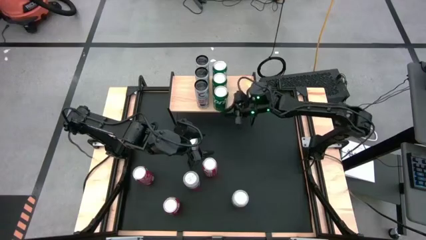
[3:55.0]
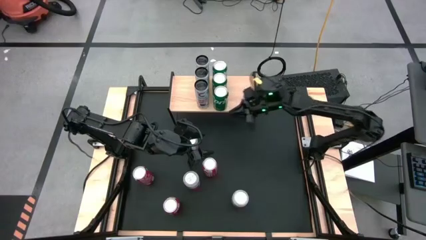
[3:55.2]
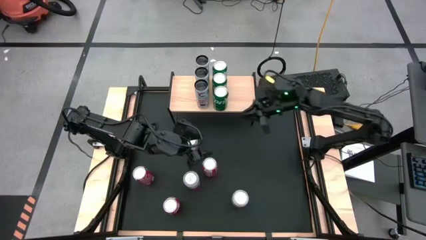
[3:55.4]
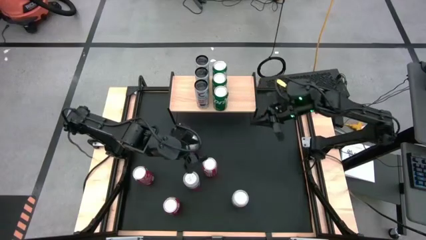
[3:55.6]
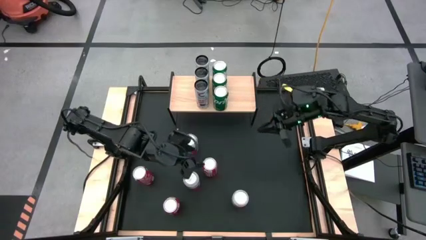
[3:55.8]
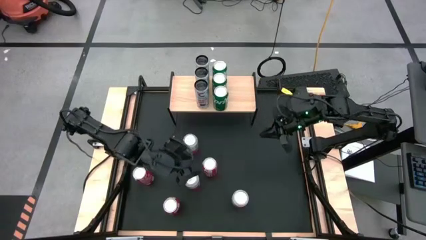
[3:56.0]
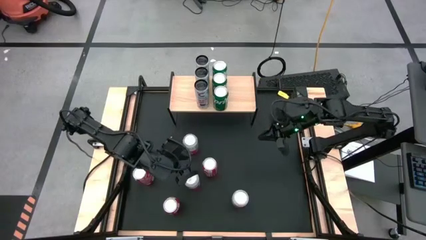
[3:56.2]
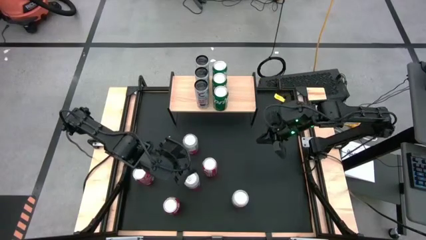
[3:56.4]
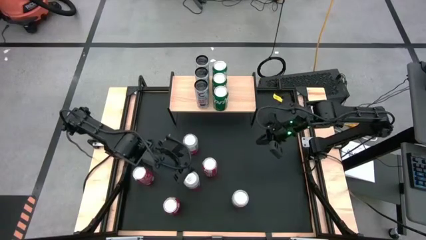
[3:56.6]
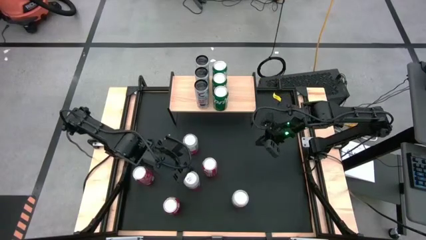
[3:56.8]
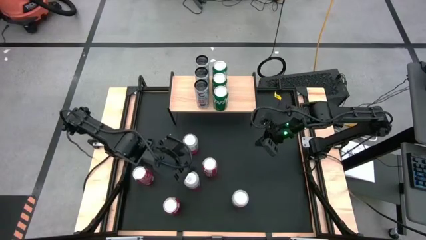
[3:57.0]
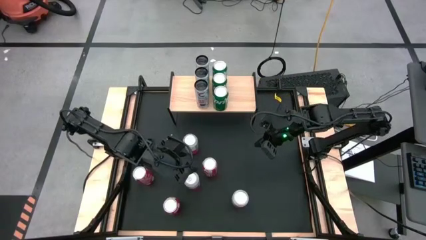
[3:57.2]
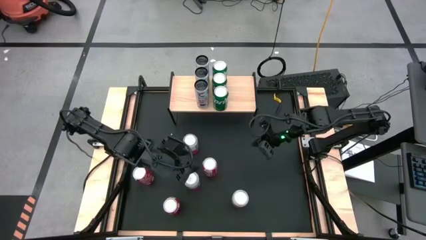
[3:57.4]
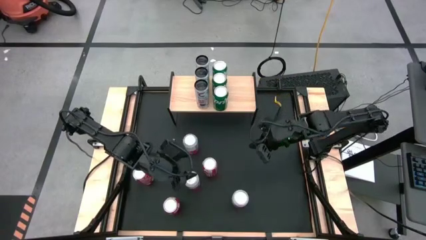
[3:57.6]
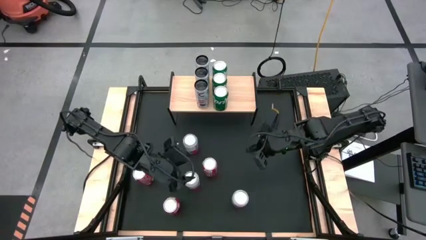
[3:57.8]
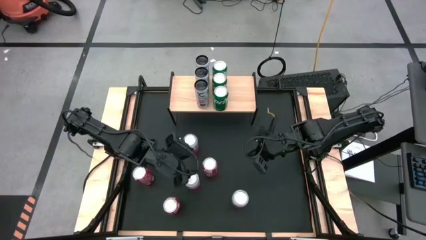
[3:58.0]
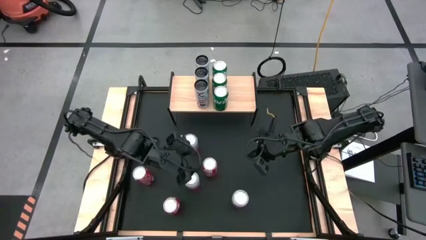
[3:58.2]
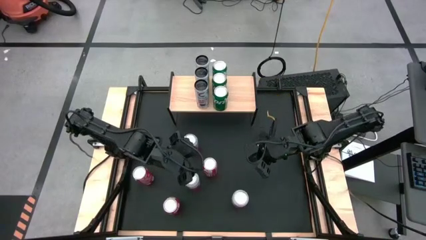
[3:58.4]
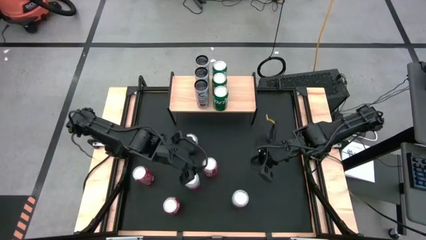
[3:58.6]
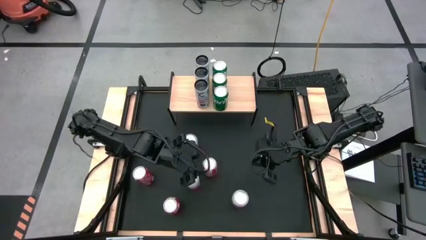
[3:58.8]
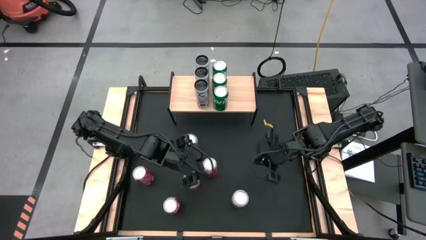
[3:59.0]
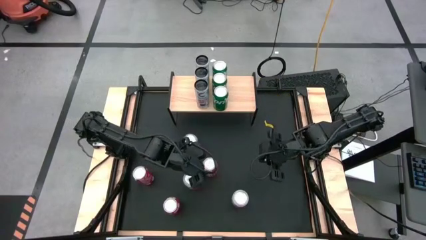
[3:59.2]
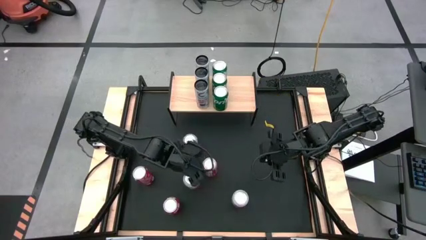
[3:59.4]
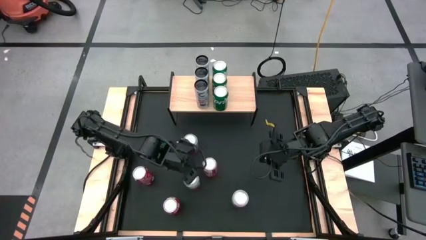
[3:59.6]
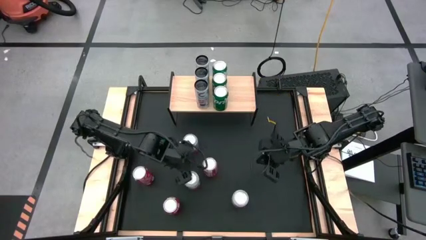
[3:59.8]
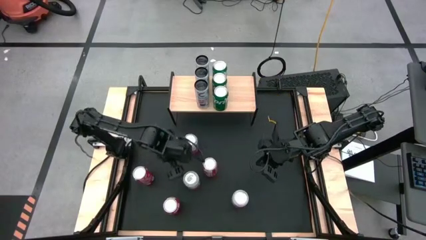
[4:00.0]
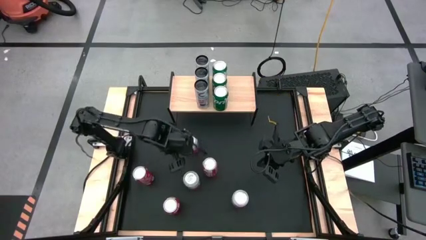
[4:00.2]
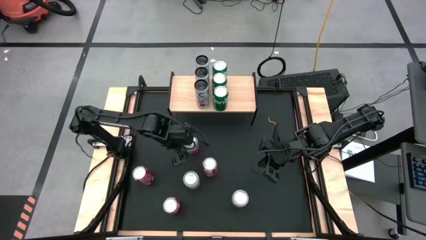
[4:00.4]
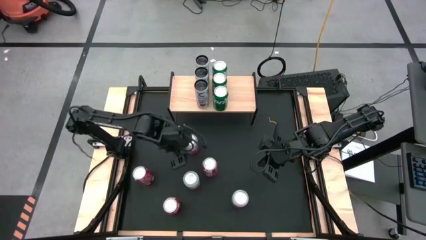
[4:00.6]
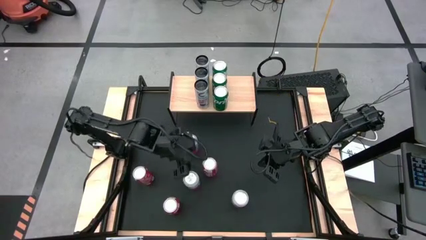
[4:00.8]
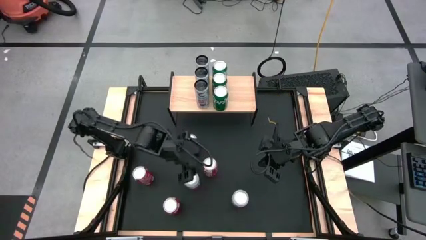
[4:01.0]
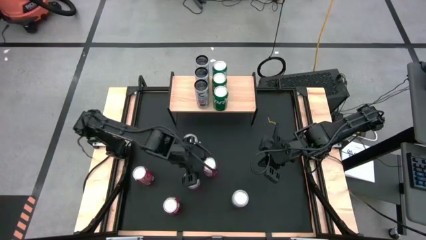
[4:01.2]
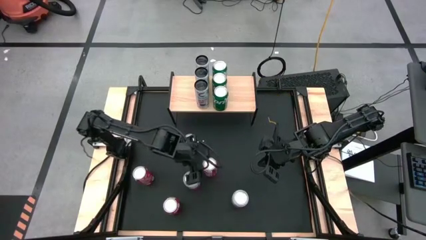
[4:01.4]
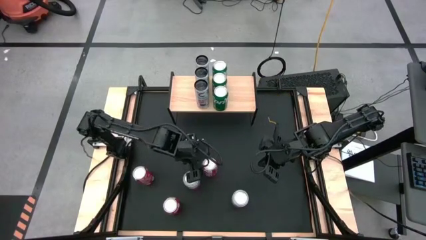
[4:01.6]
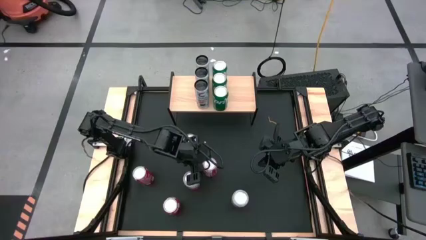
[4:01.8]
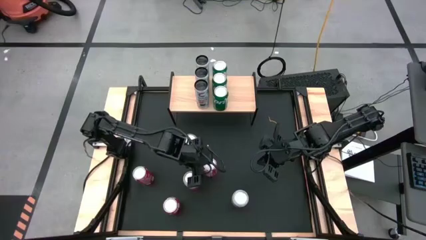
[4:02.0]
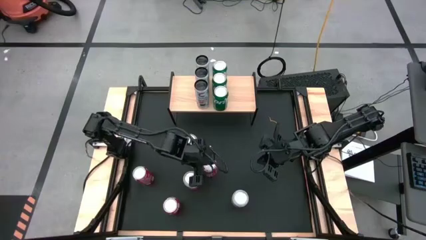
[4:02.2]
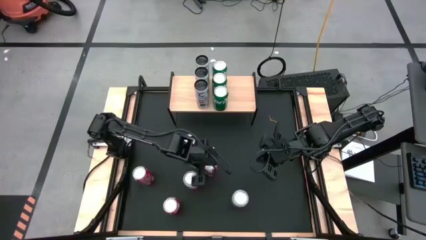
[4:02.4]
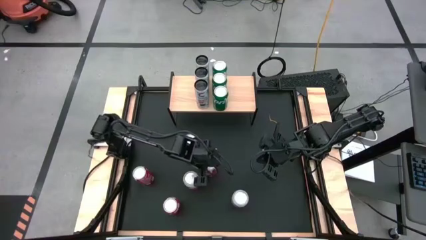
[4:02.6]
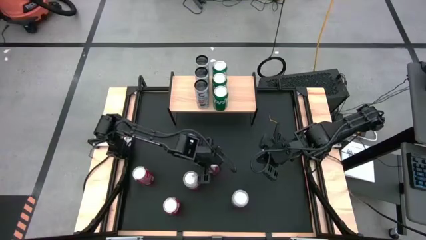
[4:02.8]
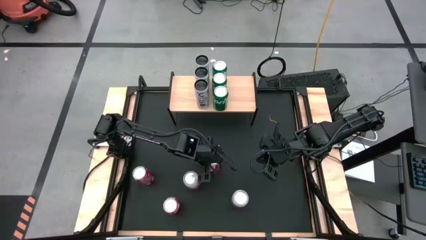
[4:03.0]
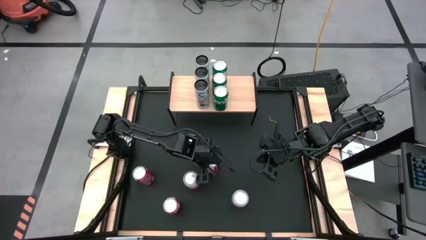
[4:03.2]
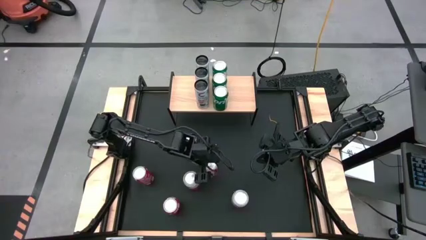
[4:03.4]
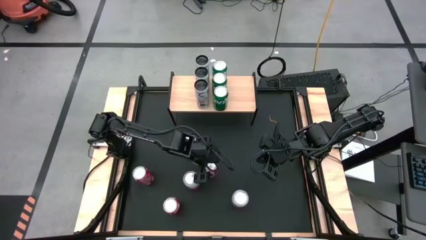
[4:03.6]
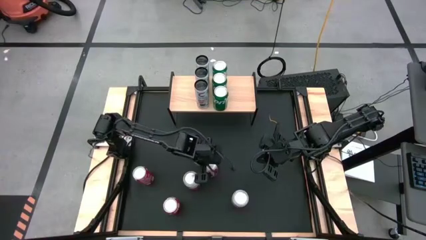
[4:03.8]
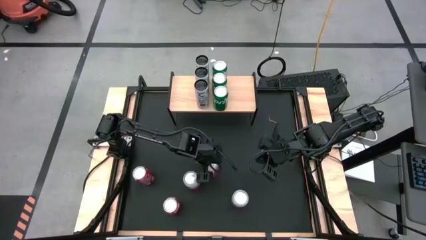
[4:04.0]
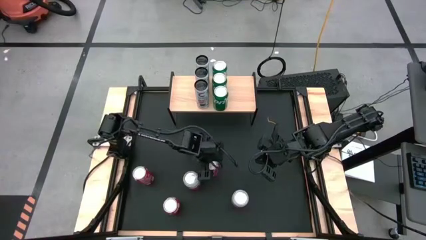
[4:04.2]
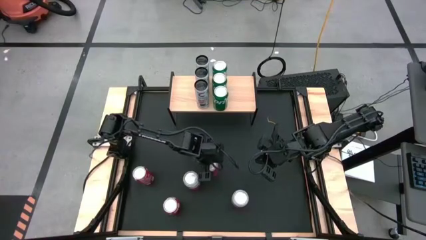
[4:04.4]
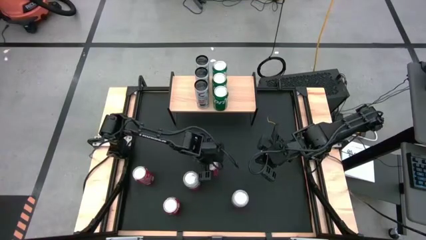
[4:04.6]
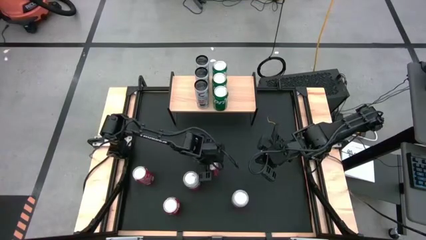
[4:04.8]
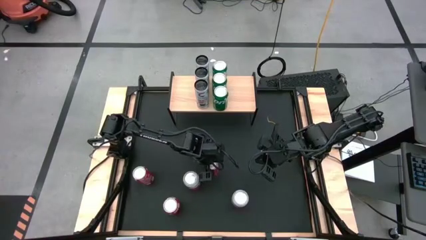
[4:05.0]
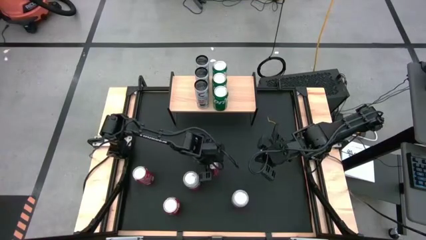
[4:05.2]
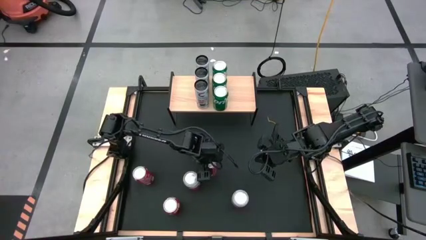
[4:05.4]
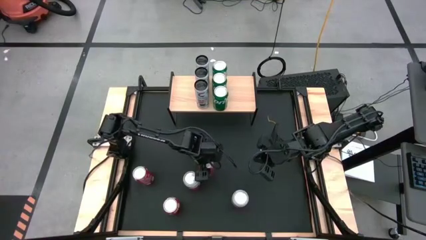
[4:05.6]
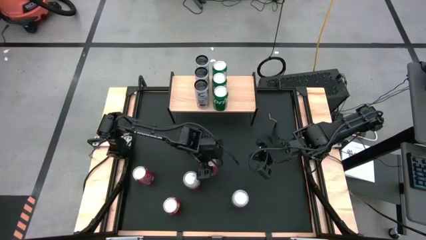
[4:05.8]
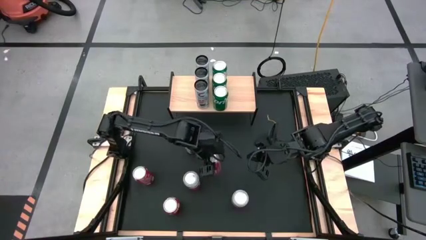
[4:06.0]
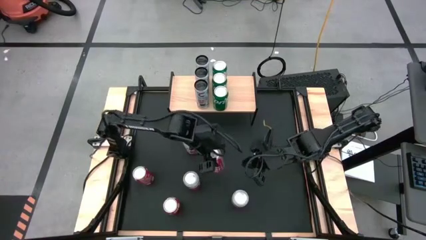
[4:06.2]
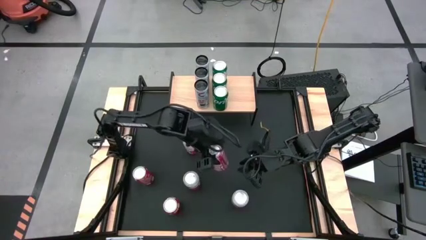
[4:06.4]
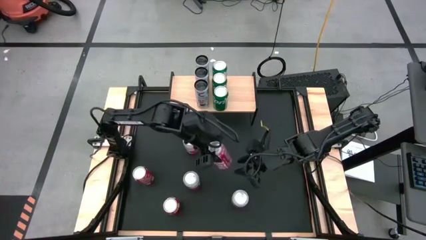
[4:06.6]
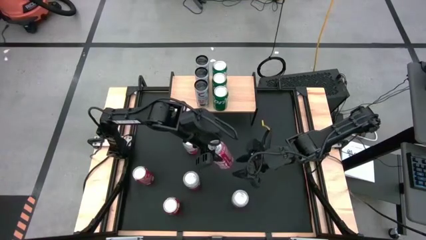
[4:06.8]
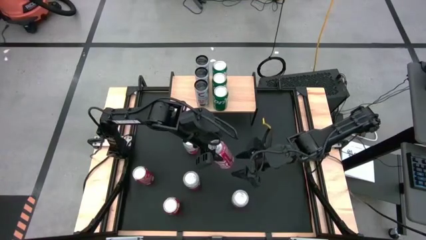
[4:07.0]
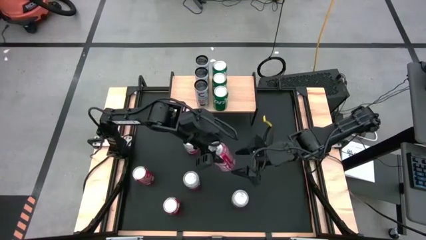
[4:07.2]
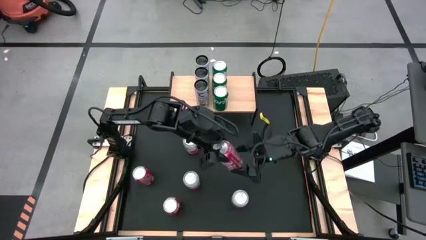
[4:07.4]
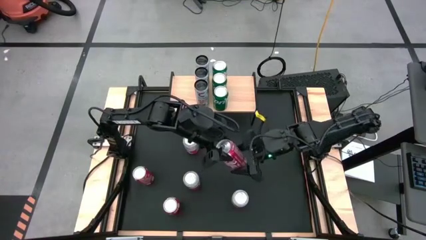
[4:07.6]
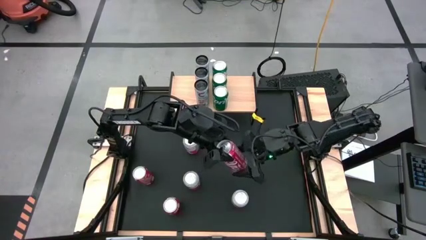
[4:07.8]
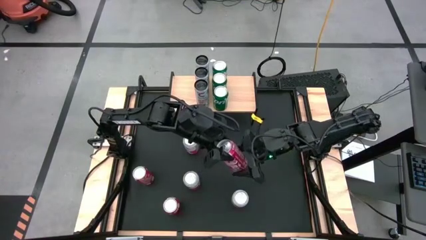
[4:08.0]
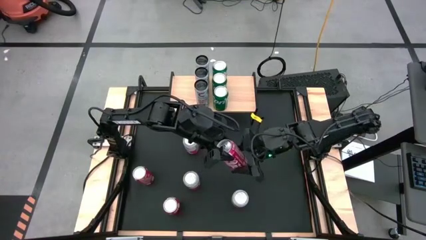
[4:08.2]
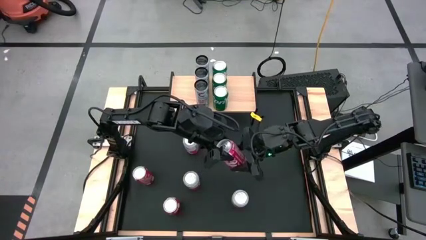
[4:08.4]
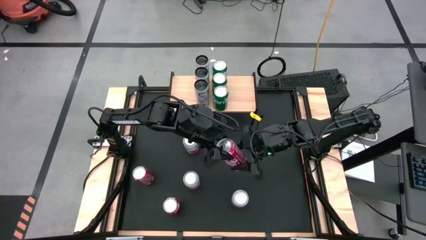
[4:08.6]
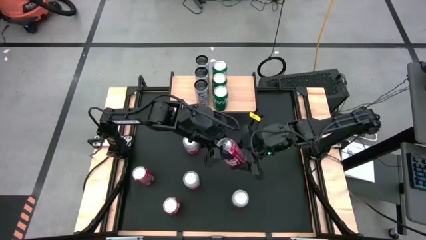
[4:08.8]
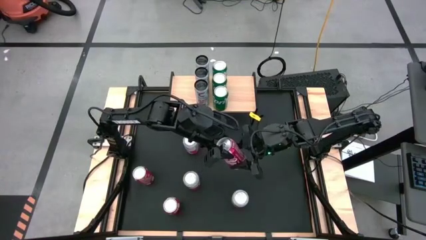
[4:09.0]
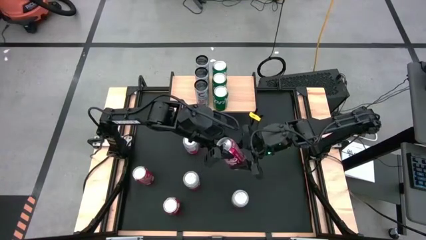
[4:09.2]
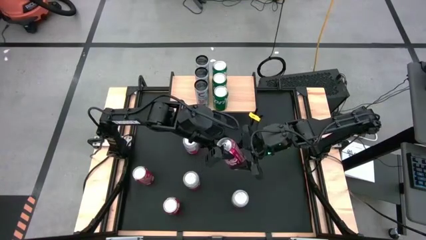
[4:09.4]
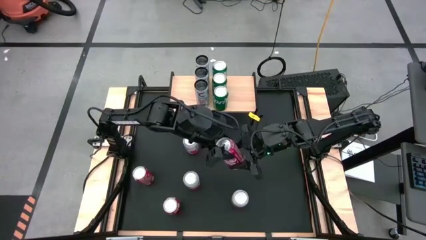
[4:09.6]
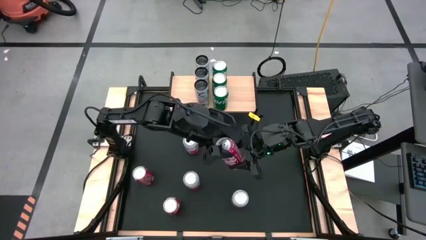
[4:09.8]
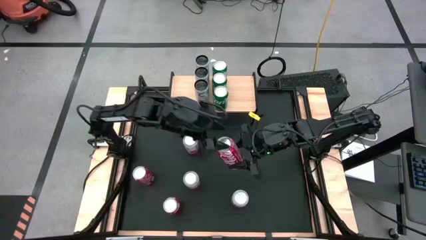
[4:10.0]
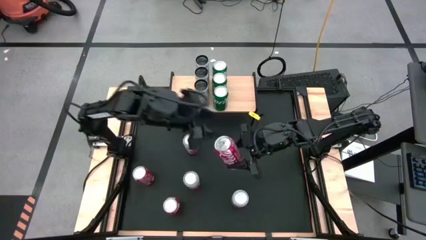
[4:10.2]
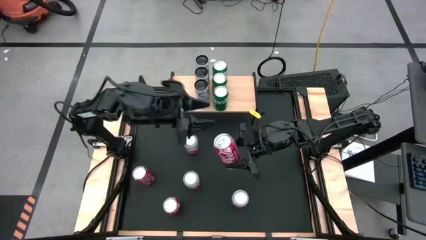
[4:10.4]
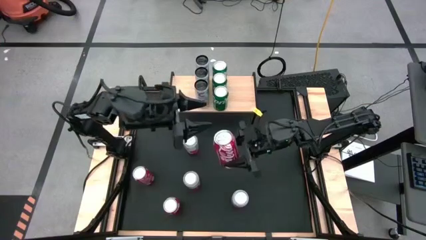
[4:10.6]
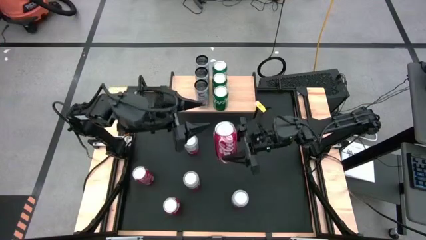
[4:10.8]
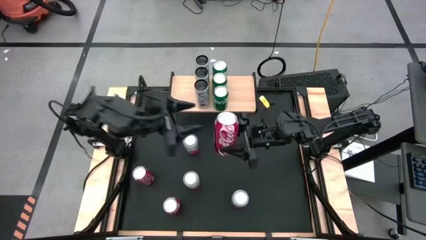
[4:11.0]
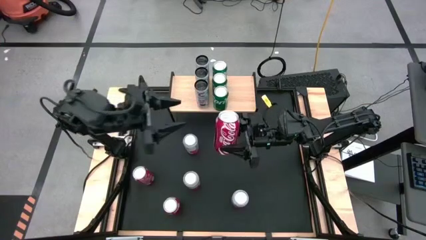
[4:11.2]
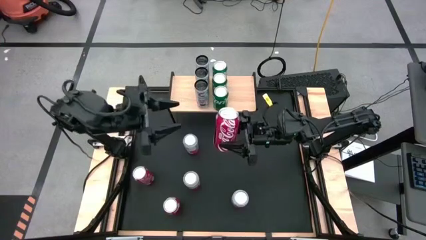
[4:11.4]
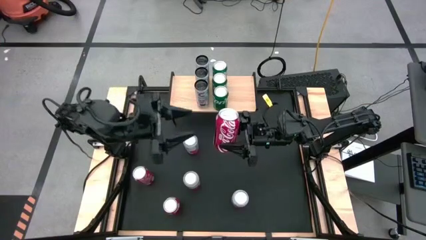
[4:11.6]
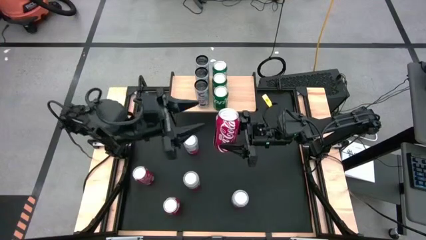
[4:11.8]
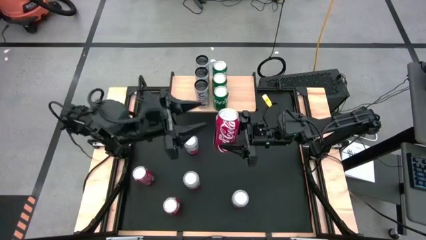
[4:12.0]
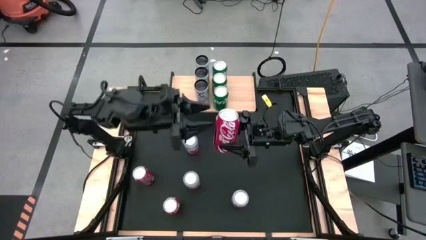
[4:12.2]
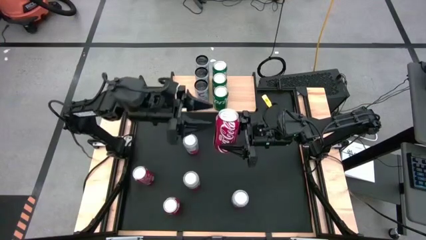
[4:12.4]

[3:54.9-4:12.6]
Task: Place canned beverage on shelf
Put the top right red white soda can on the shelf
